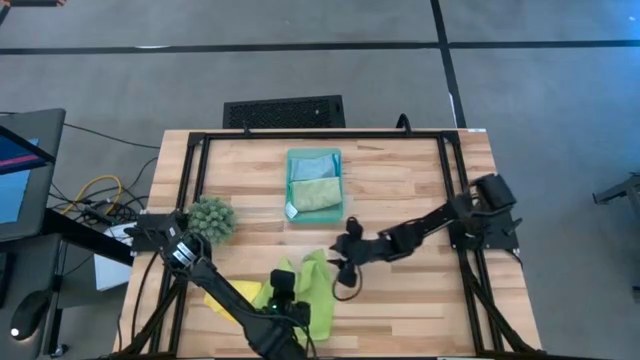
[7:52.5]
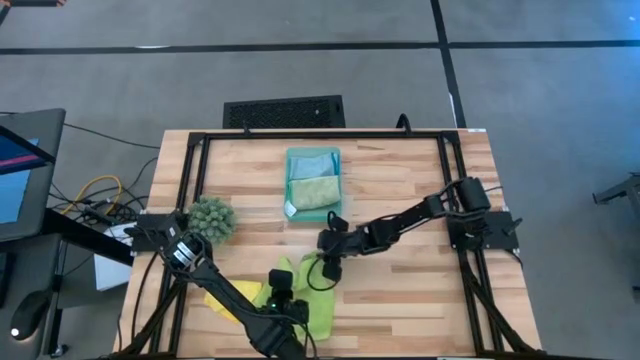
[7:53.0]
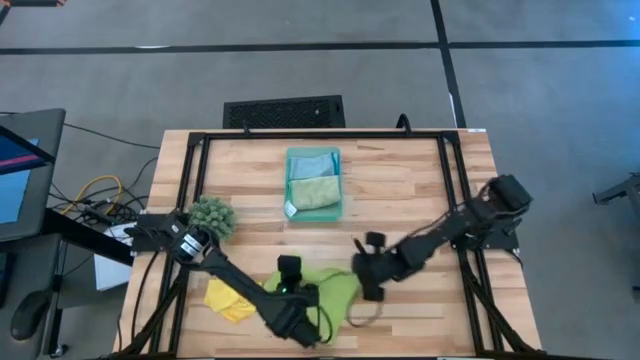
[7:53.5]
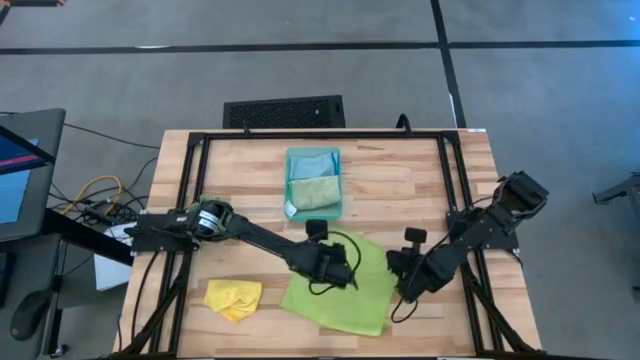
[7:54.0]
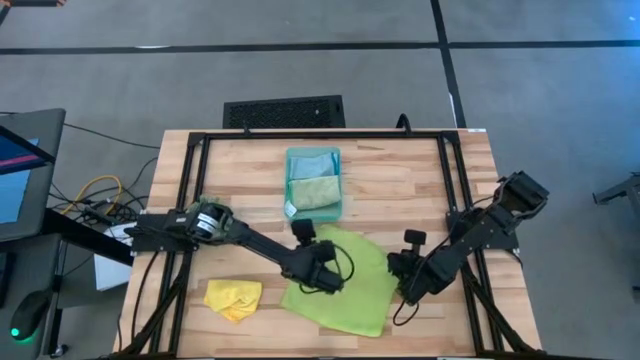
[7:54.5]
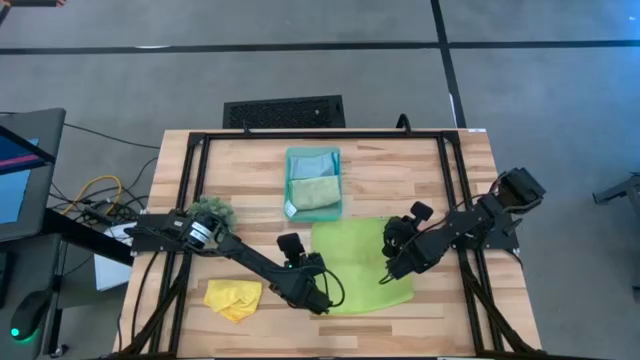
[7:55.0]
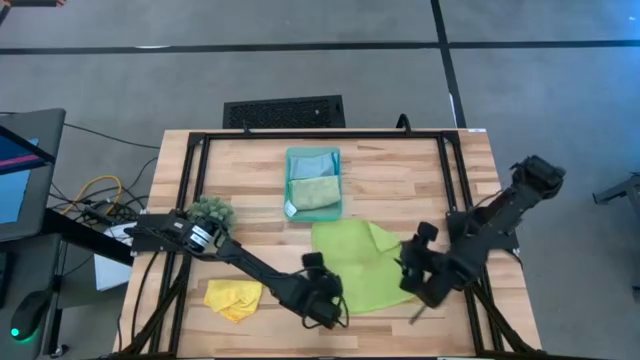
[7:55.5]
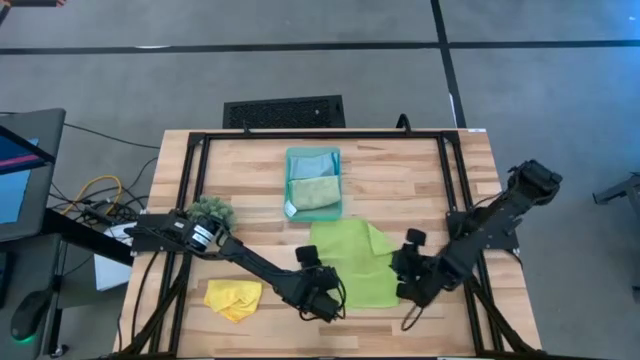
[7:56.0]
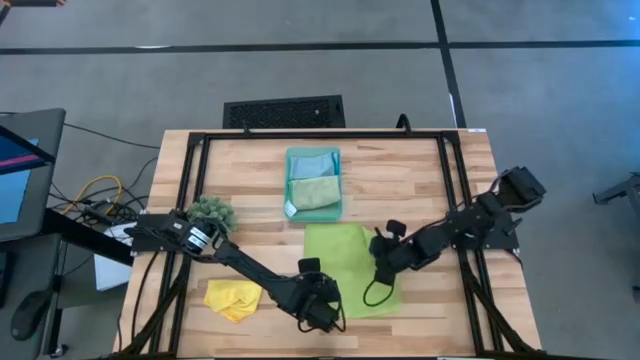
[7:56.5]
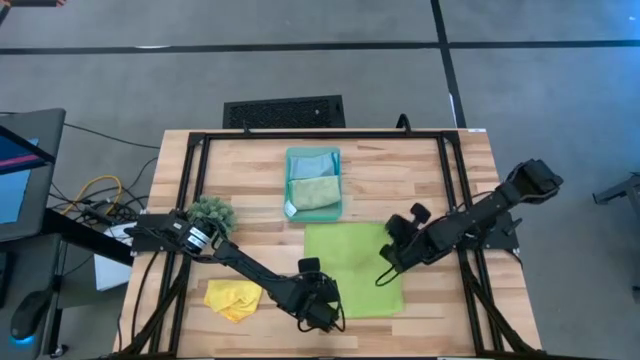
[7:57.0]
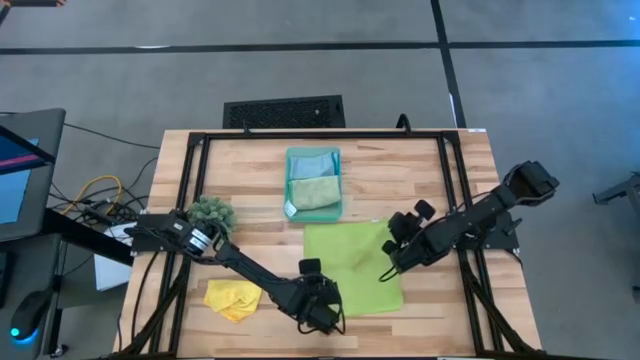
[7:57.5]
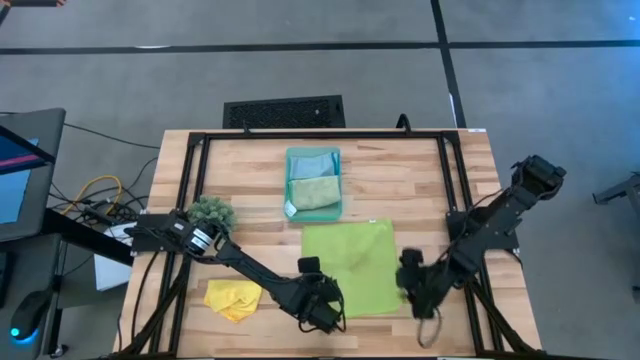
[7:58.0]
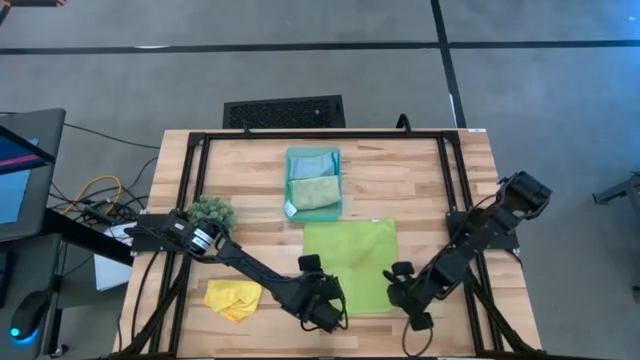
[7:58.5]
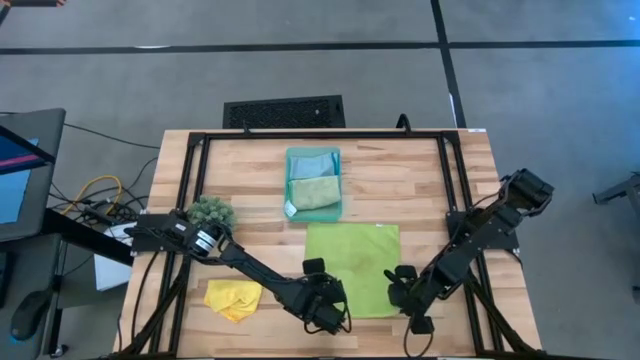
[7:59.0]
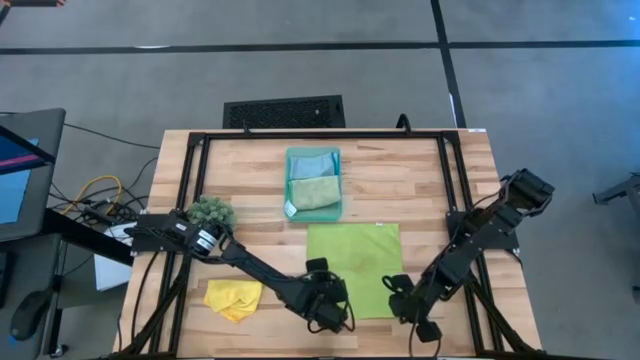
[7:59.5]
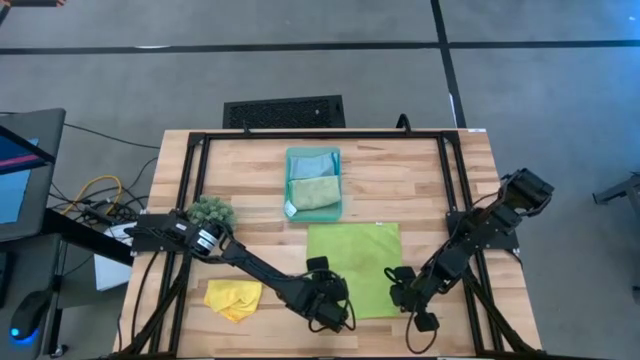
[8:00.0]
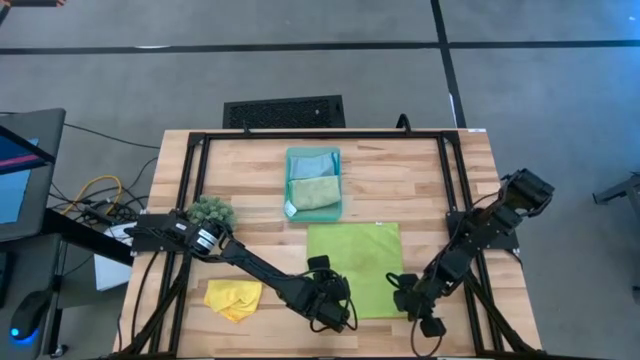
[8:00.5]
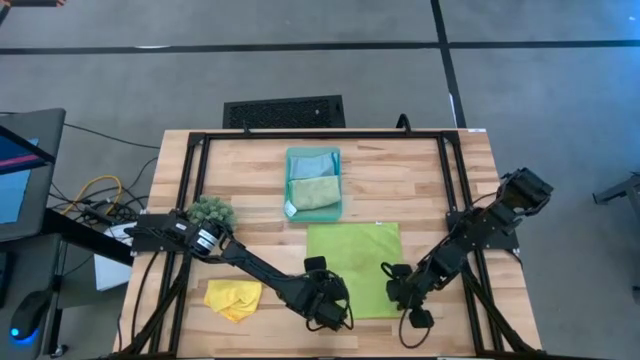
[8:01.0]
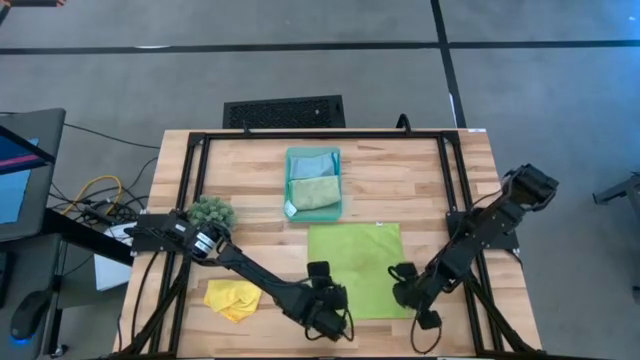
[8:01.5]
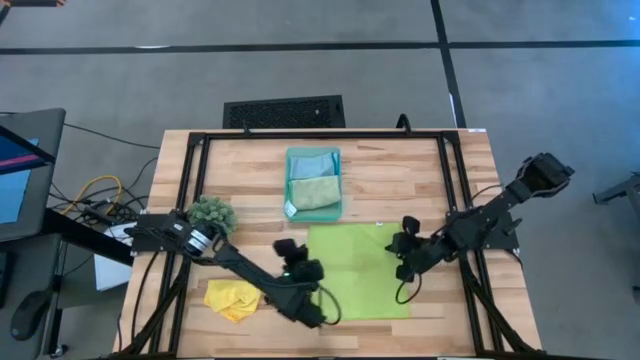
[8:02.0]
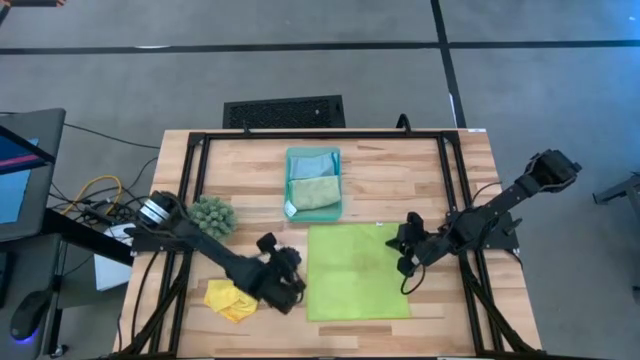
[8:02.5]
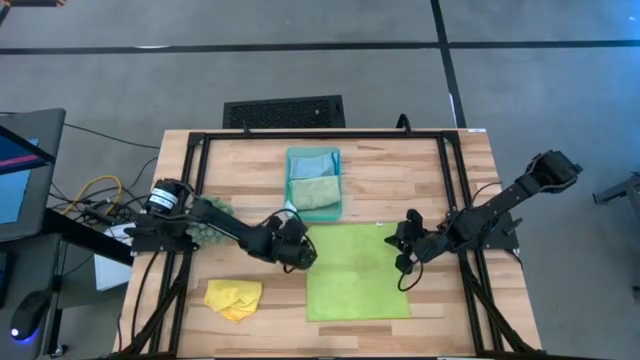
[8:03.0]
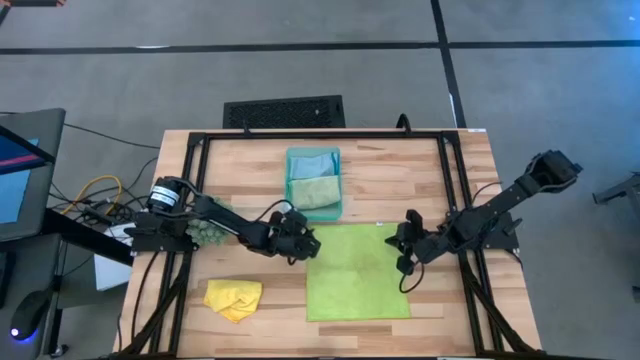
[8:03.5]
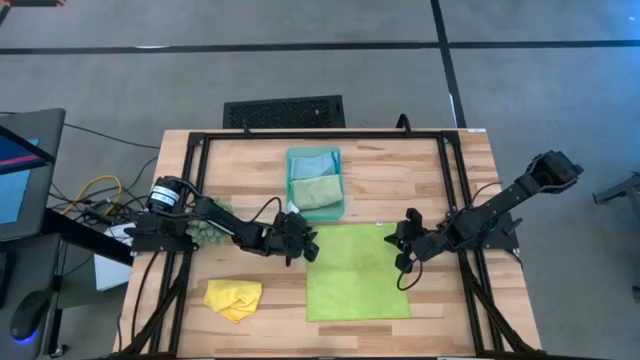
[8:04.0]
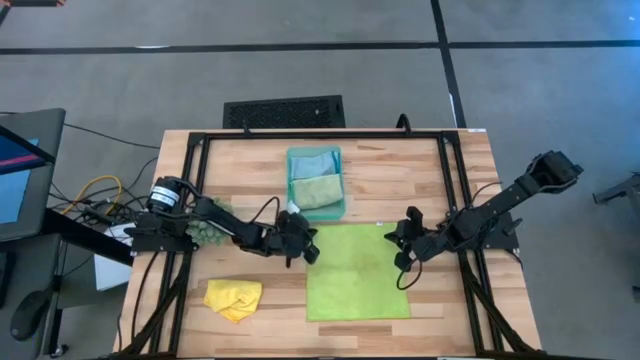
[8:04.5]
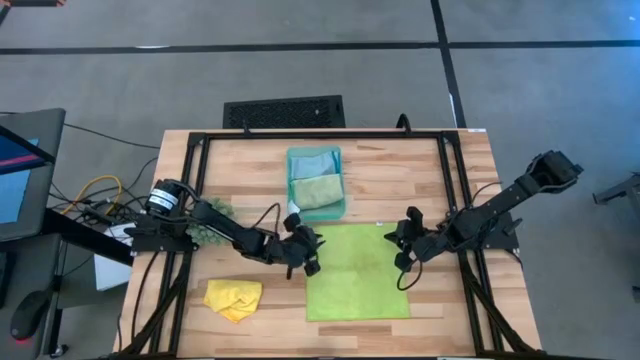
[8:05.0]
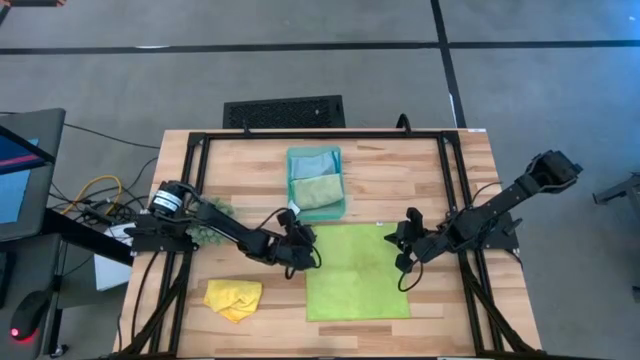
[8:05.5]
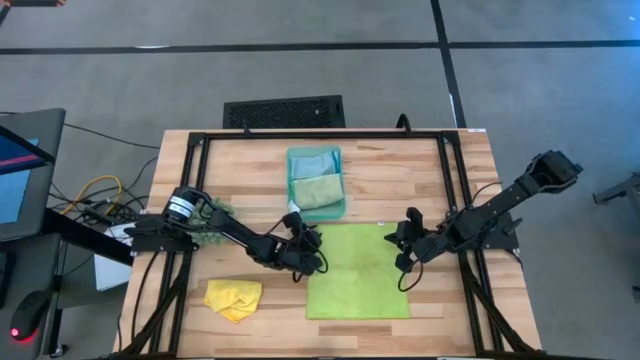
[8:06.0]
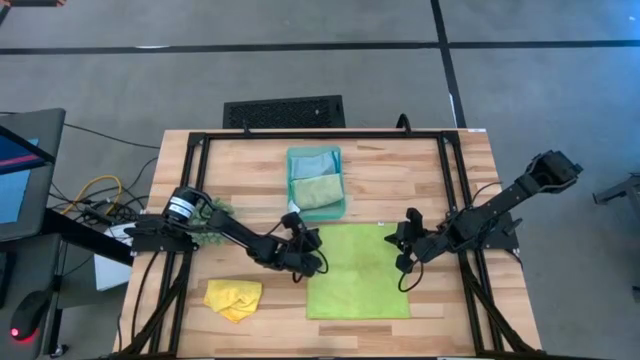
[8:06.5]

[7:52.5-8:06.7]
Task: Fold microfiber towels
Fold the light green microfiber cloth

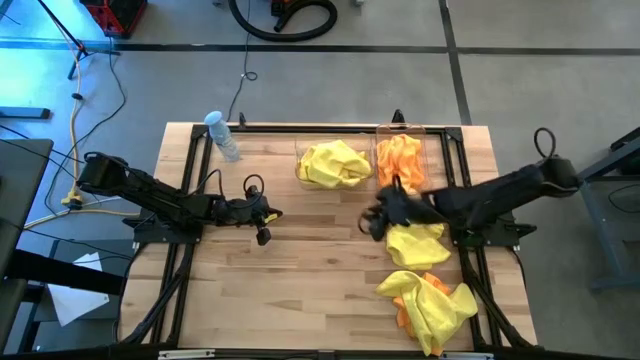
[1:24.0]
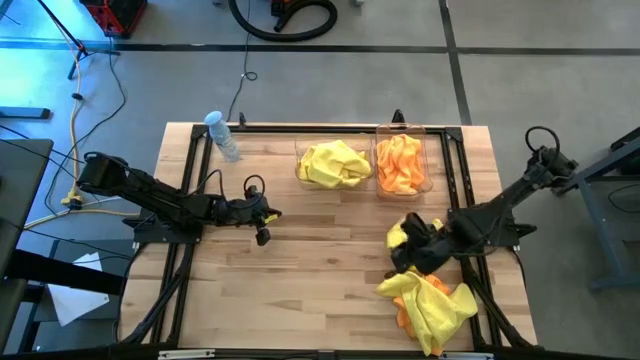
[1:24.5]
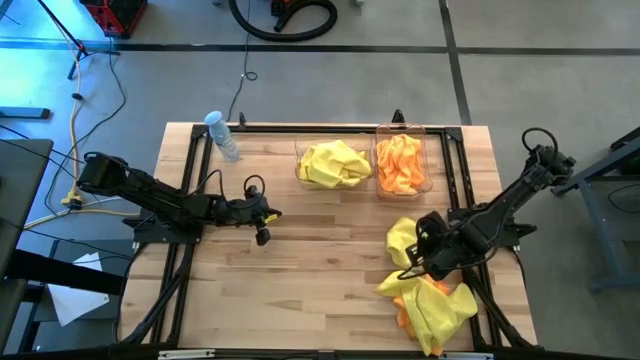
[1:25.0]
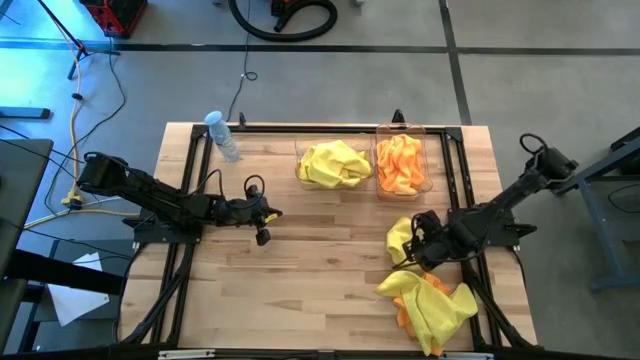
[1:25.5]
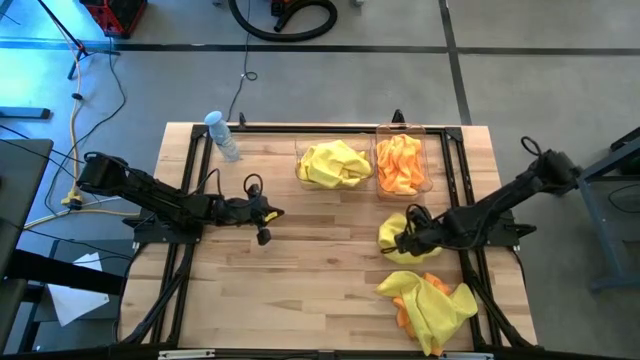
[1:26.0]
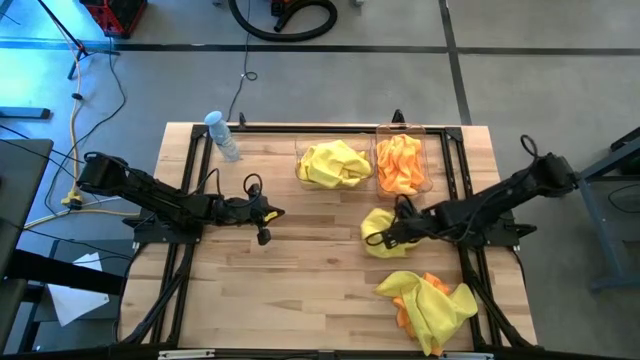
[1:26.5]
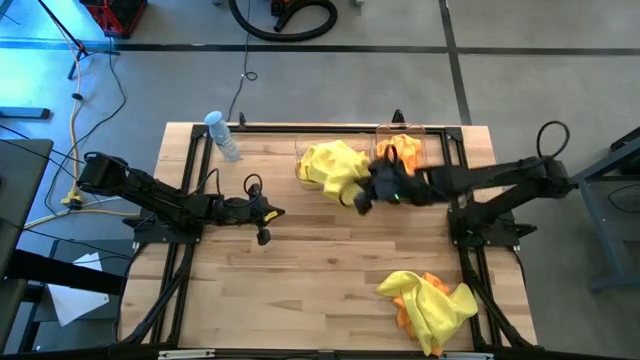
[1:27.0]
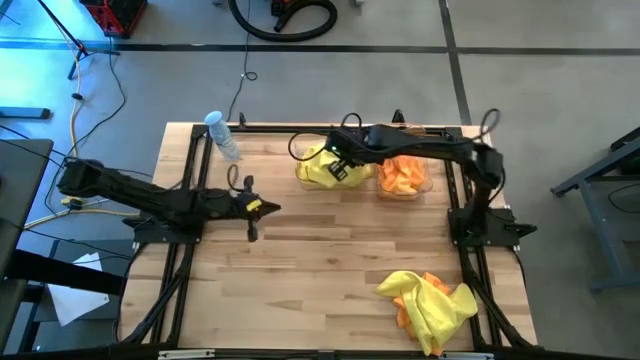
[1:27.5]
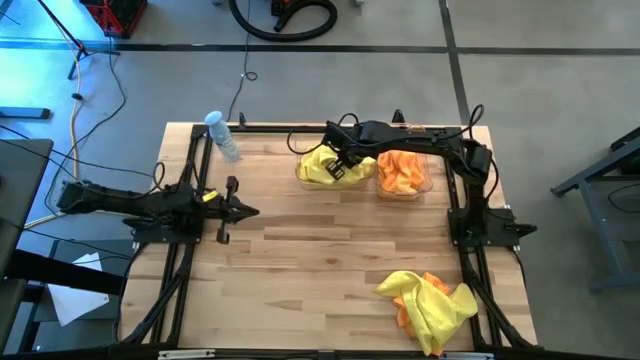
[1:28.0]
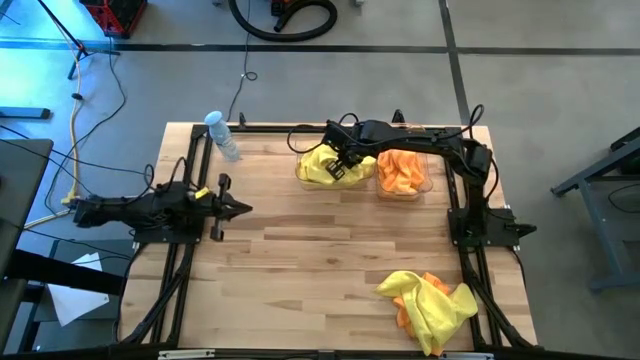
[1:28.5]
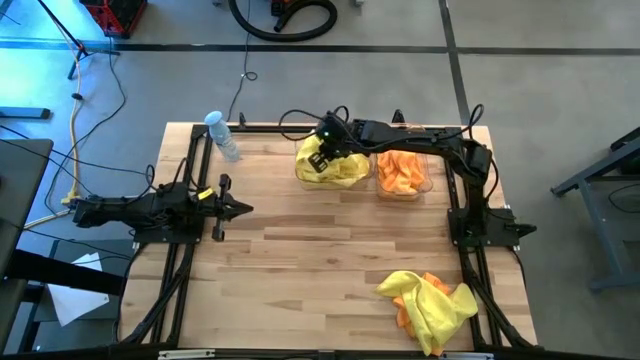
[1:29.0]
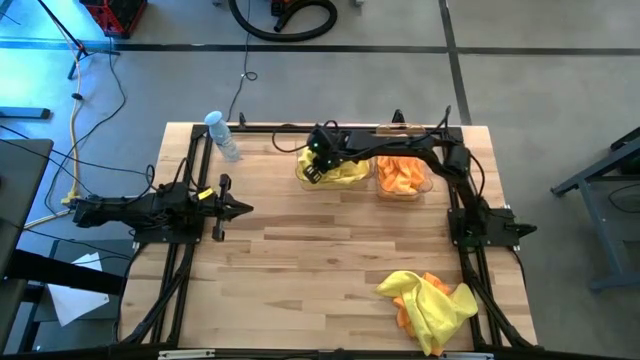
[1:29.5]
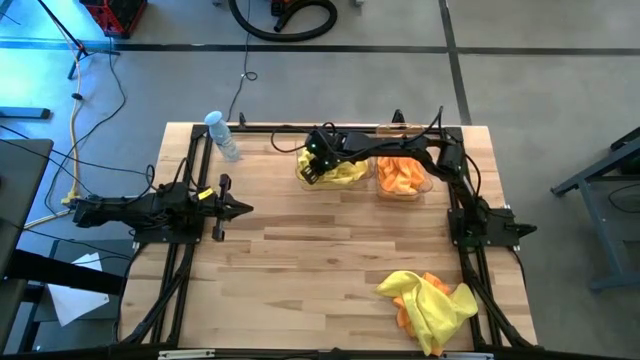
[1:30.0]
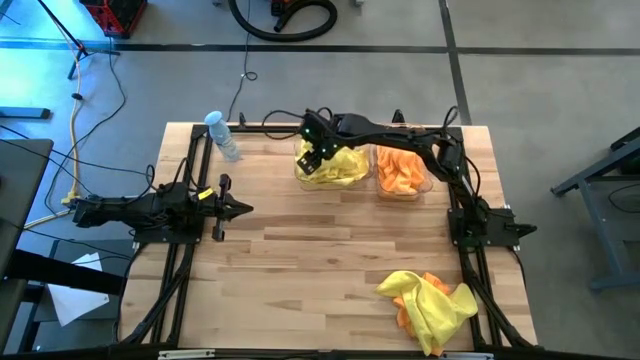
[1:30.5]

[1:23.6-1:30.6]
Task: Sort microfiber towel by color & place in baskets
Put the yellow microfiber towel into the left transparent bin
